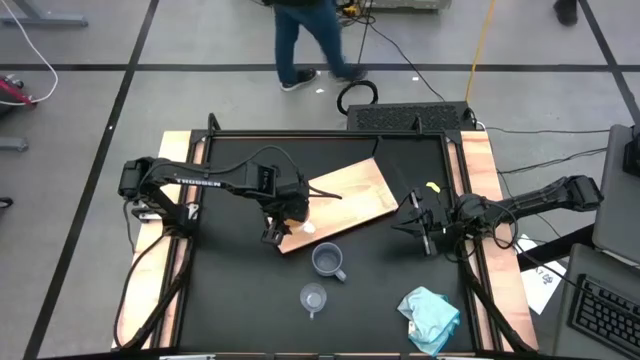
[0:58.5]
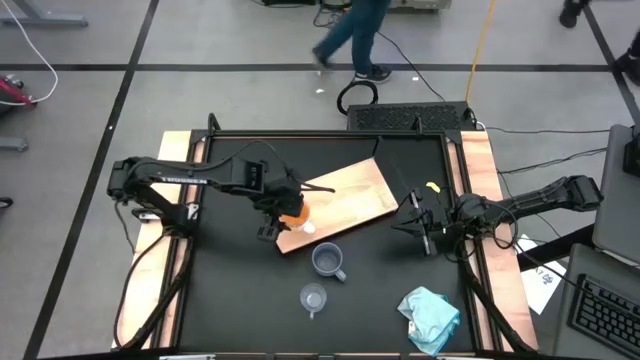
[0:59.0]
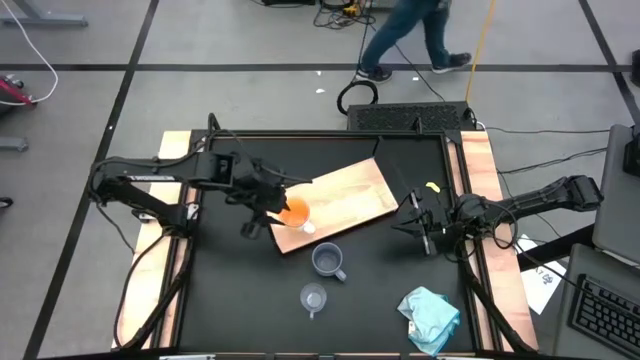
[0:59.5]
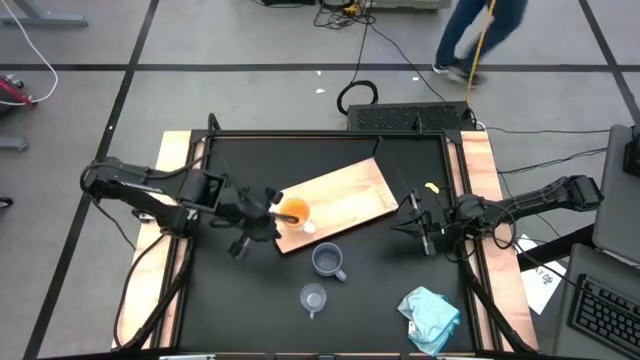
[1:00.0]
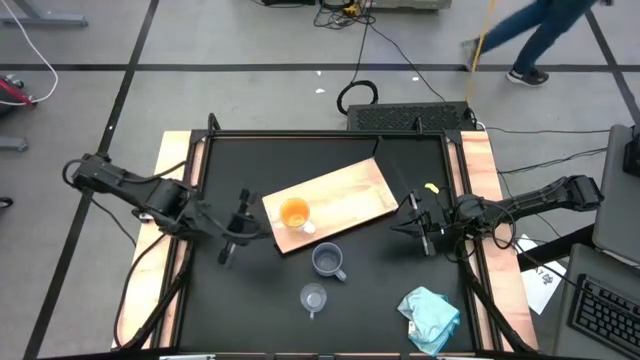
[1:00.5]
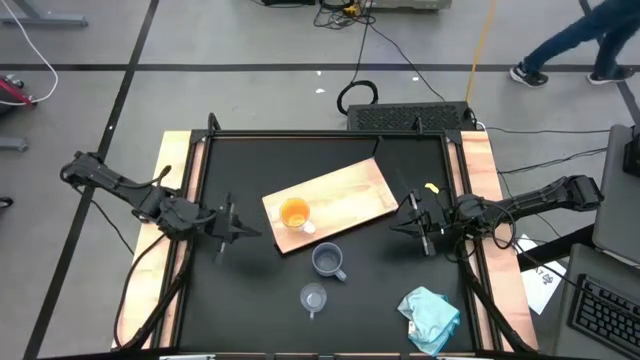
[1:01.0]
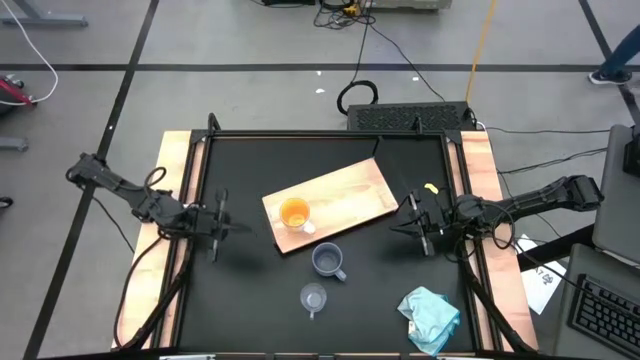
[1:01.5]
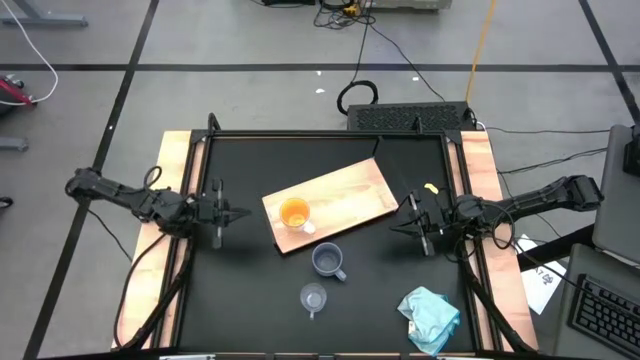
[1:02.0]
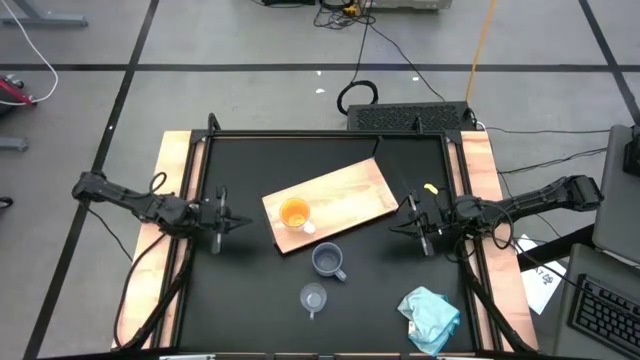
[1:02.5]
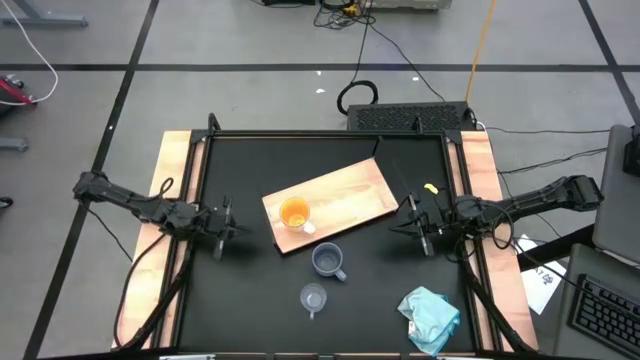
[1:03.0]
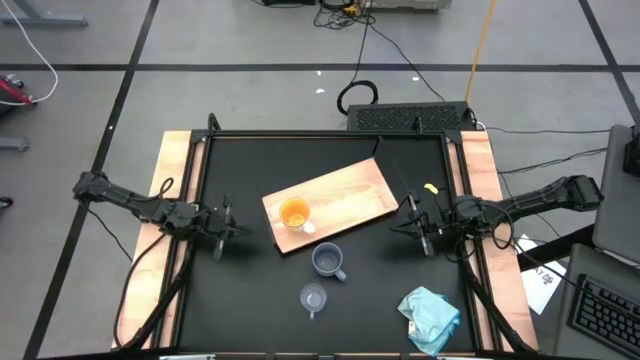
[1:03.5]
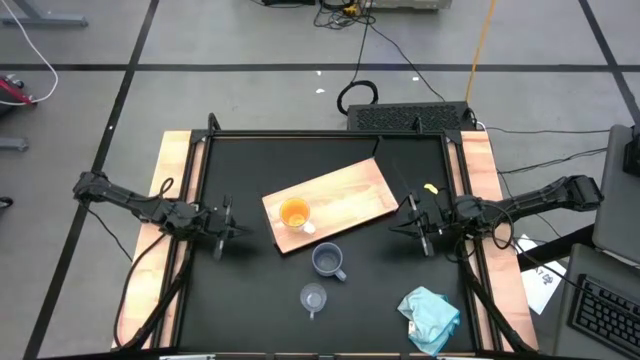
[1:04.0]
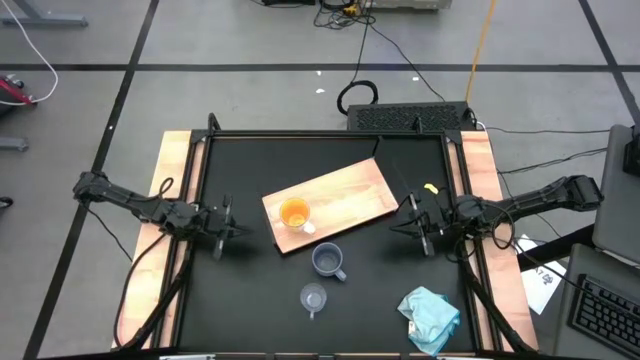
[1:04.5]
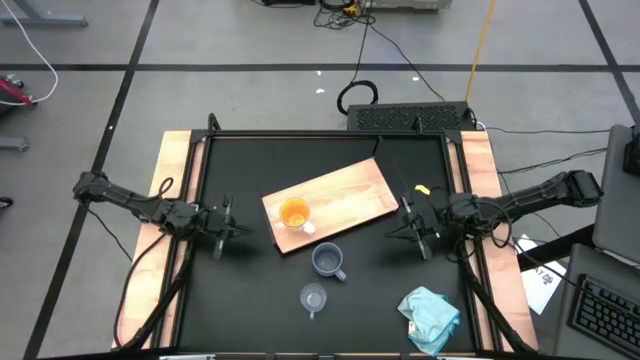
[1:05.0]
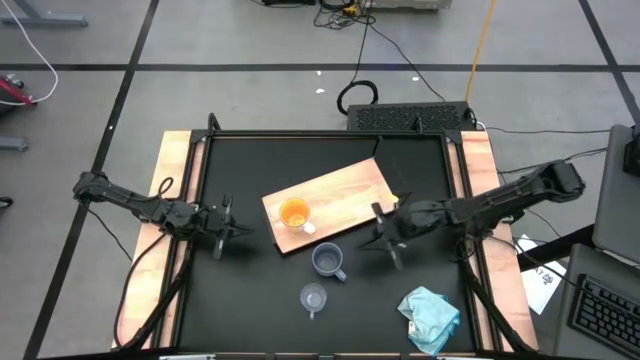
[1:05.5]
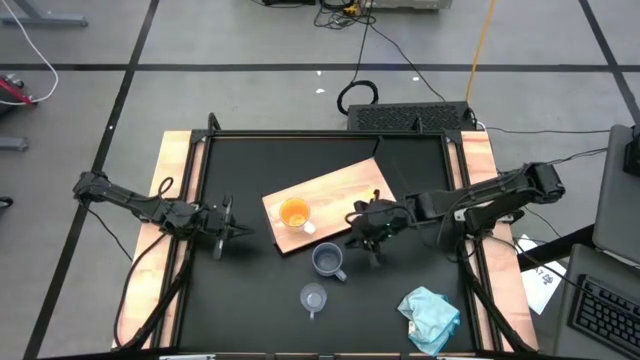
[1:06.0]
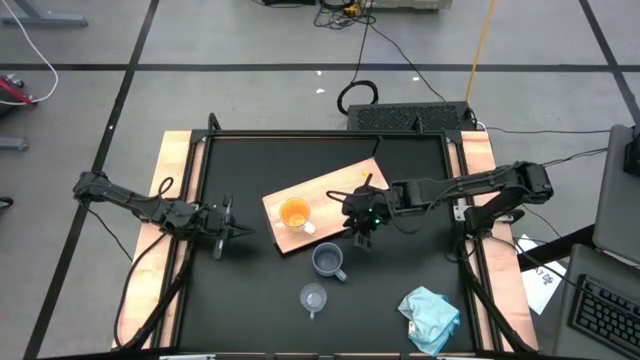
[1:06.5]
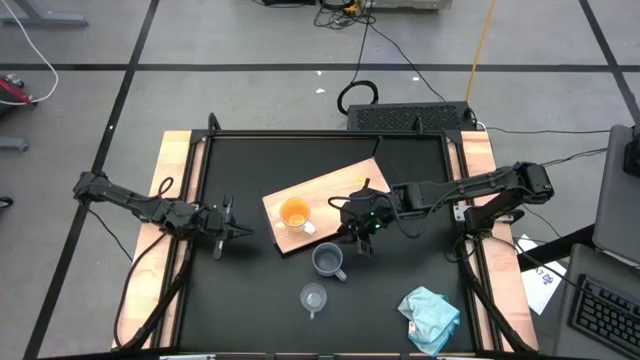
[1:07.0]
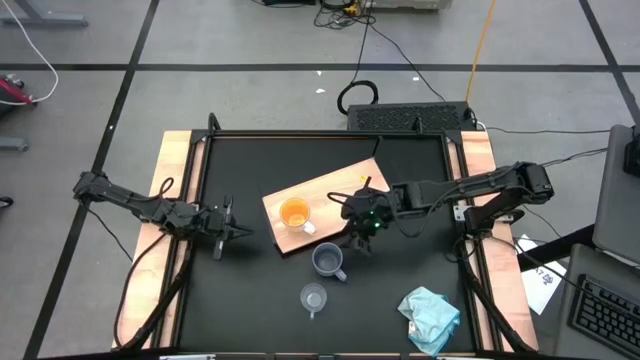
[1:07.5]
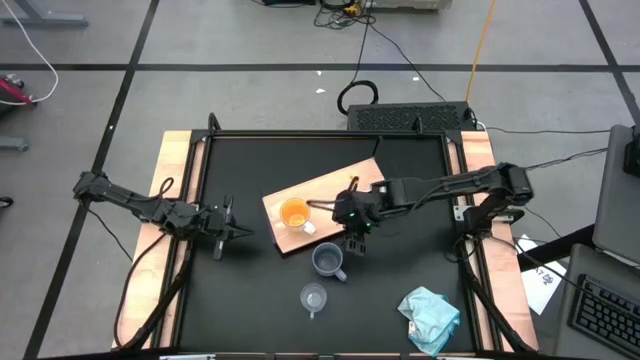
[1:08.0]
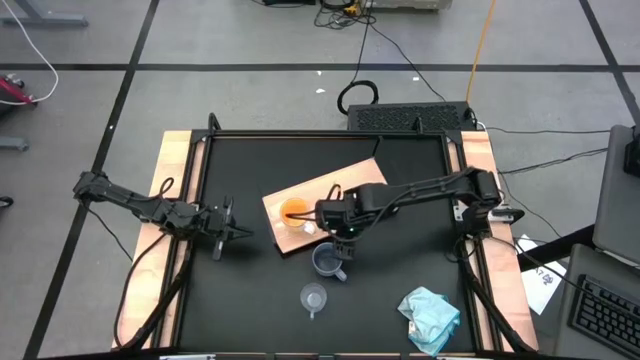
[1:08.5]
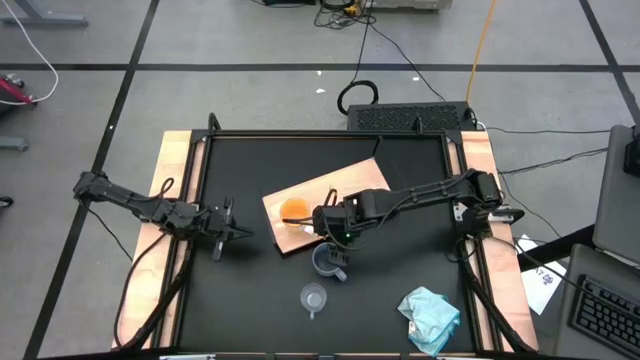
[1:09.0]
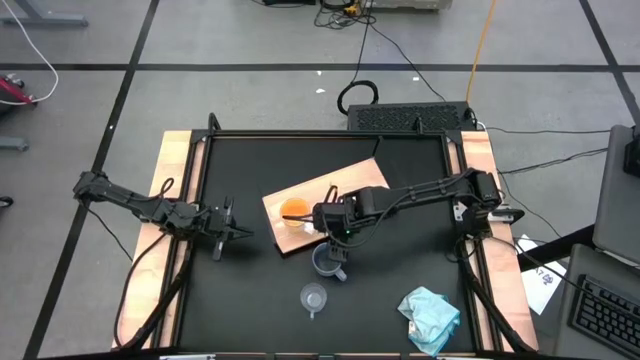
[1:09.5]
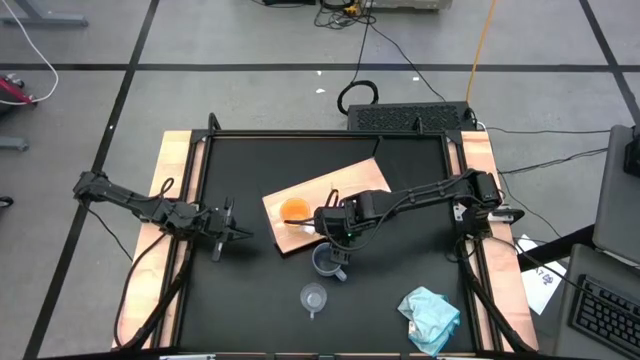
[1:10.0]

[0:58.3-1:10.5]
Task: Stack small to large cups/mugs on shelf
Put the gray mug on the shelf

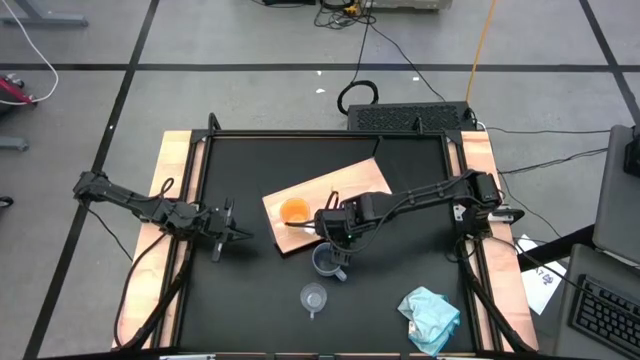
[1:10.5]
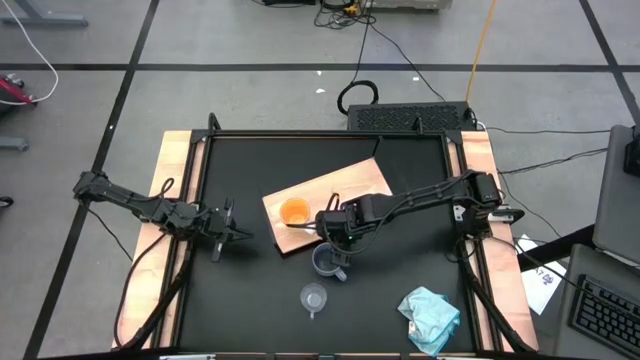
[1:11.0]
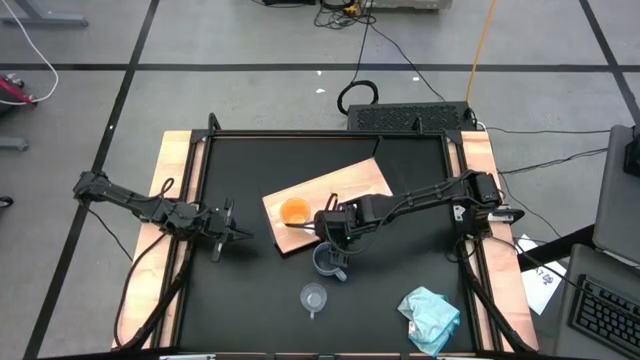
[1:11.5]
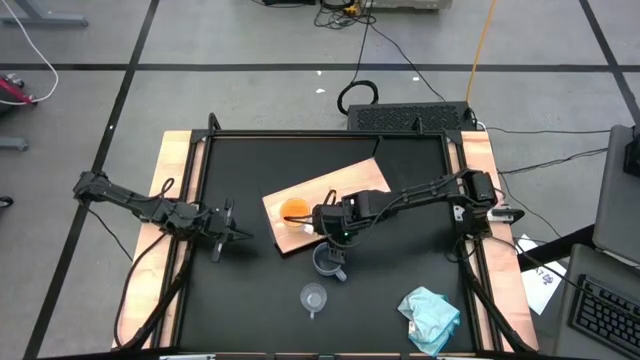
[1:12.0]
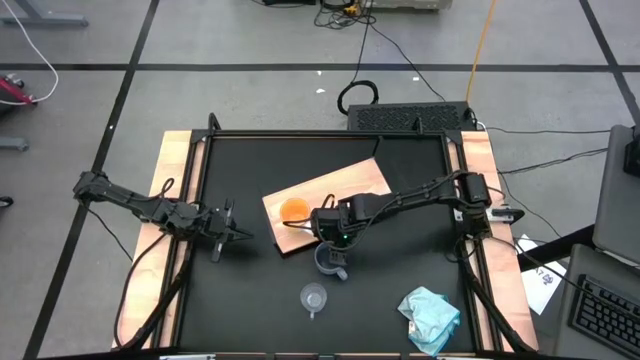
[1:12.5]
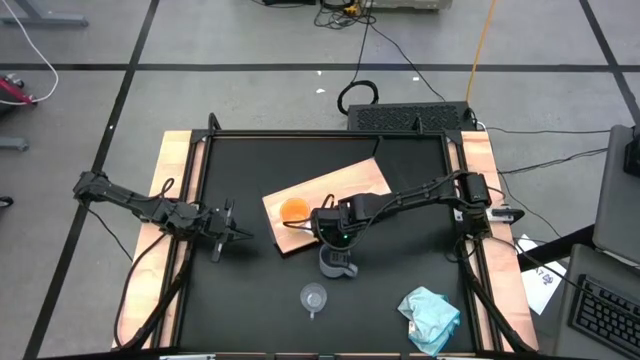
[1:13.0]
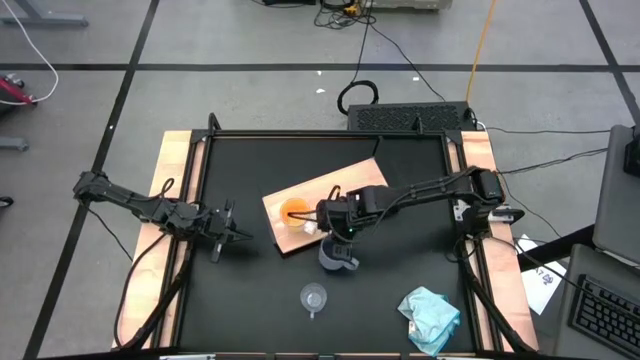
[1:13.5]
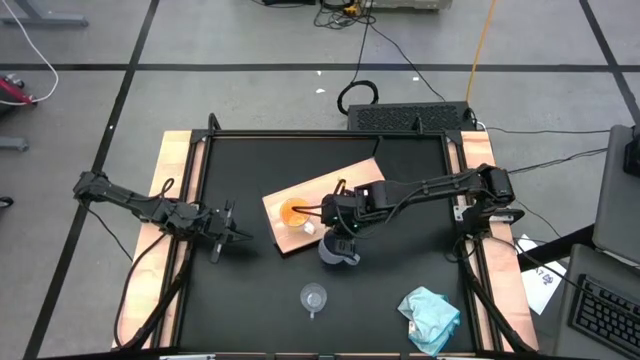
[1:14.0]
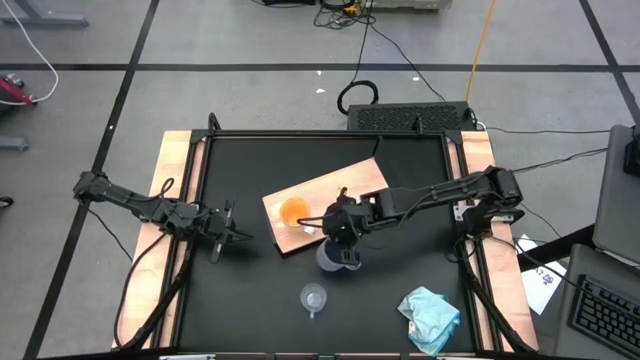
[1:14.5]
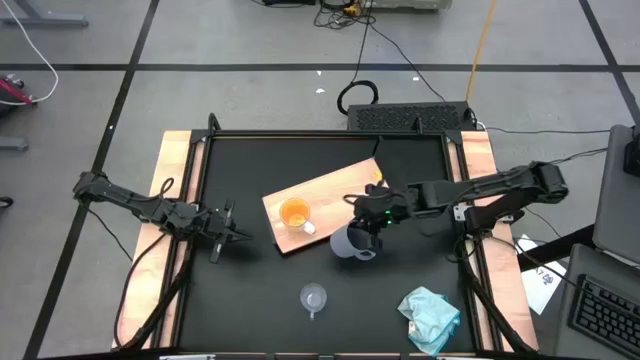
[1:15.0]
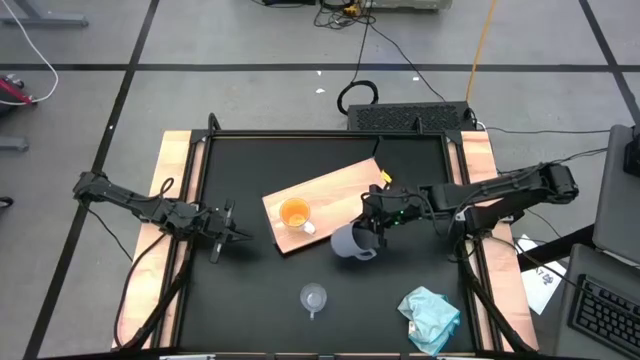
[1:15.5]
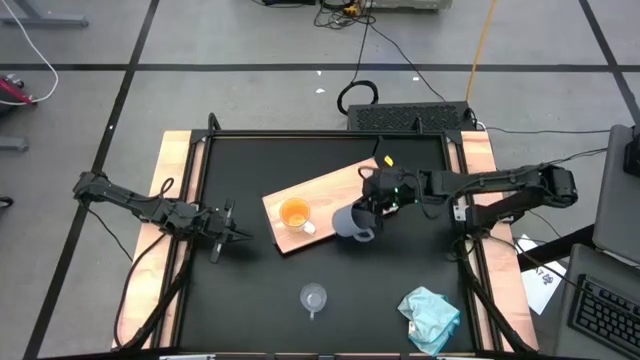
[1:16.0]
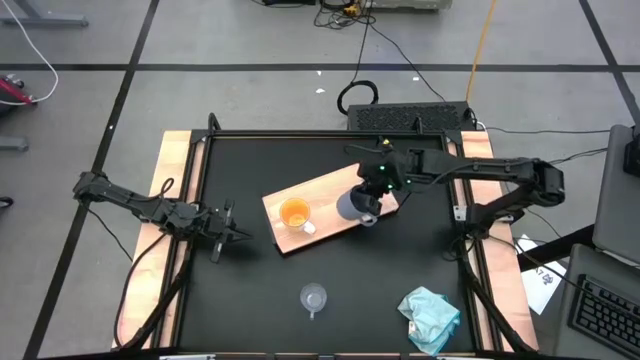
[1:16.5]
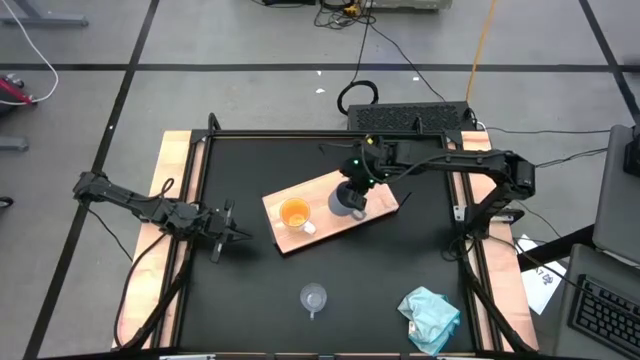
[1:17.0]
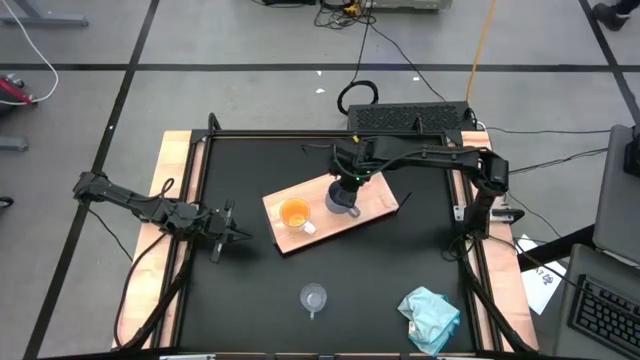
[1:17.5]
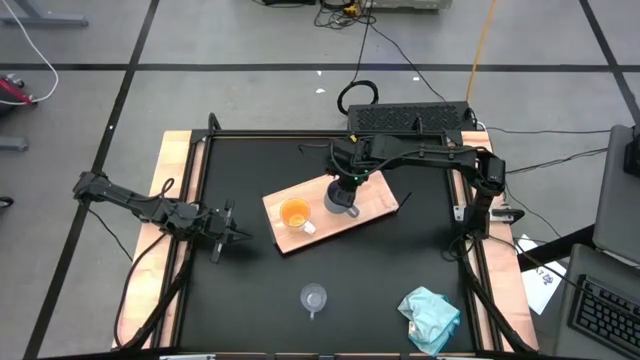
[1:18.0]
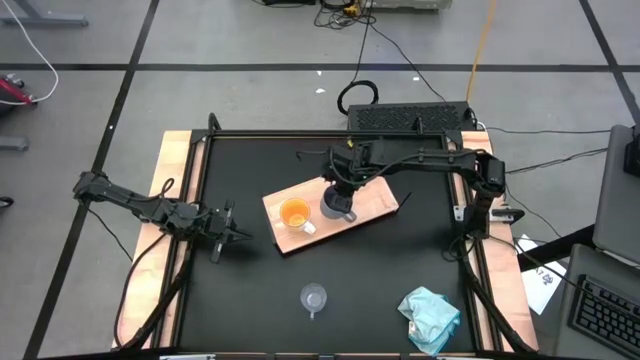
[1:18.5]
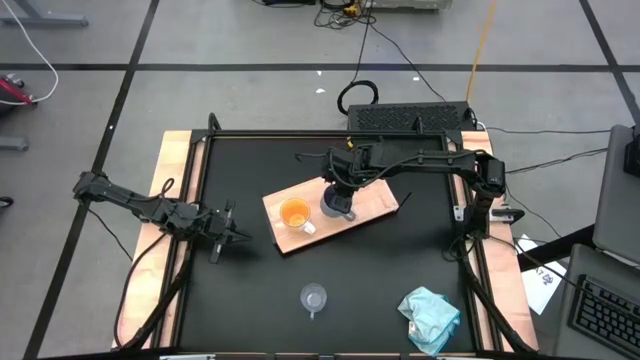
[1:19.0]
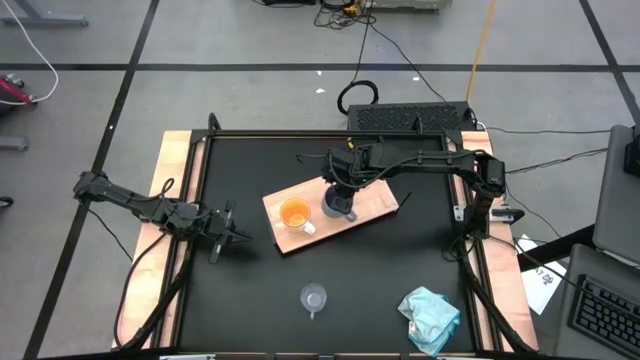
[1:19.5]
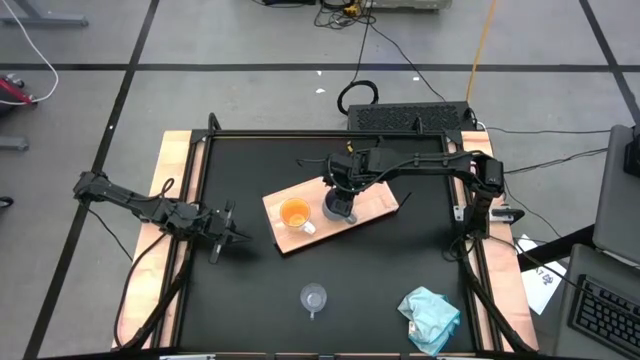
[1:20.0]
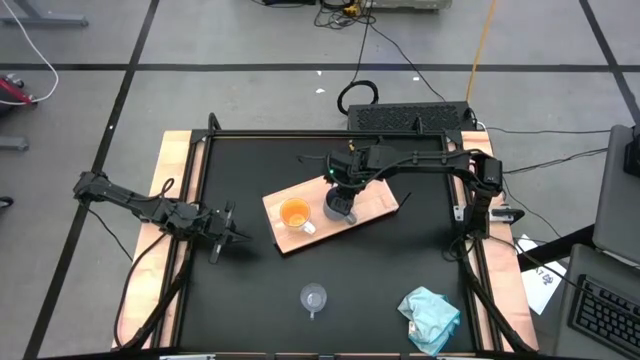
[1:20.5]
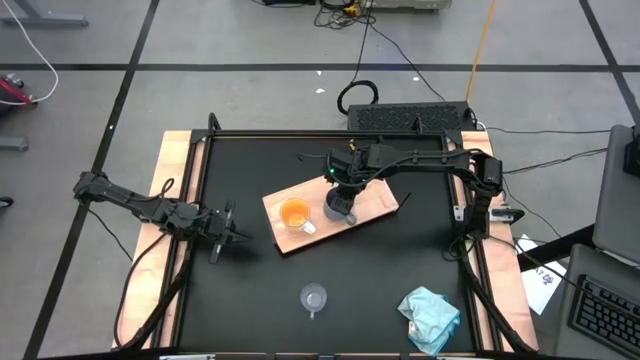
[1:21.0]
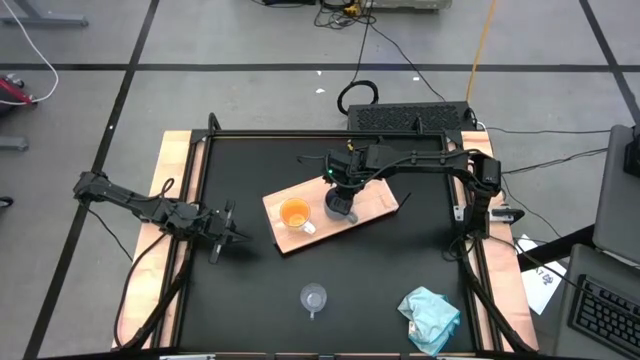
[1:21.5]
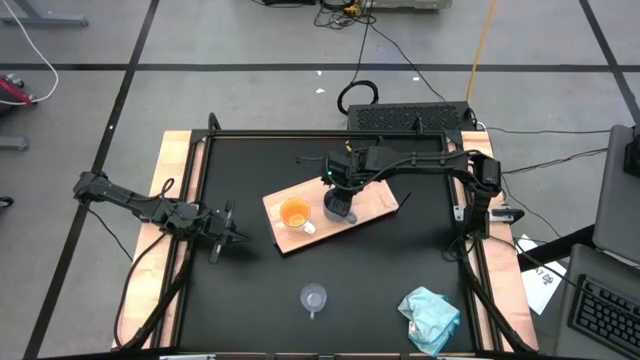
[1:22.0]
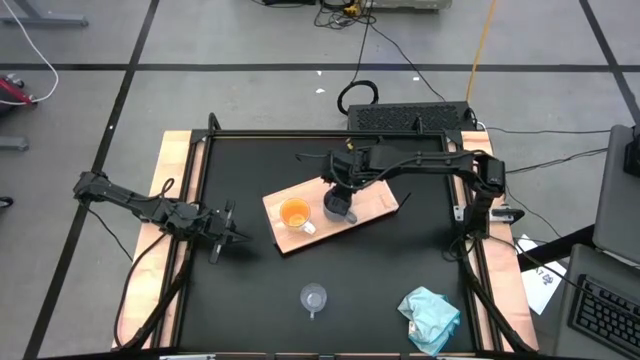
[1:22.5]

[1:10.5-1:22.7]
Put the gray mug on the shelf
